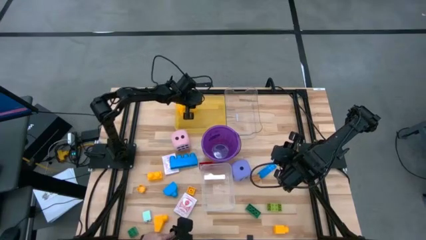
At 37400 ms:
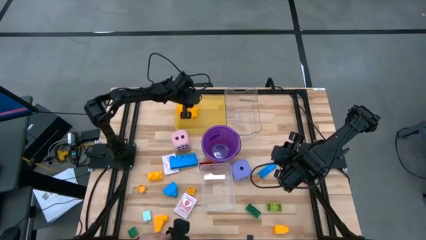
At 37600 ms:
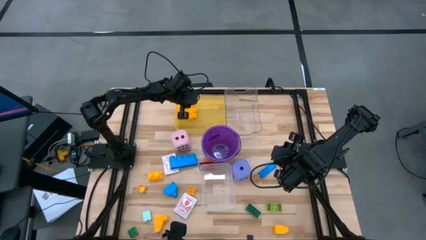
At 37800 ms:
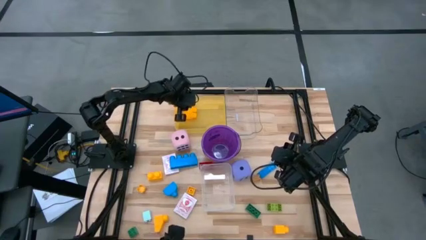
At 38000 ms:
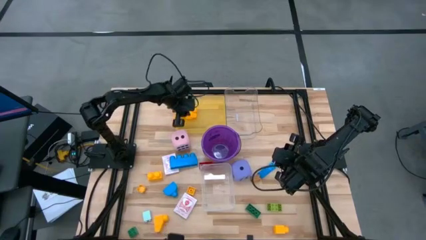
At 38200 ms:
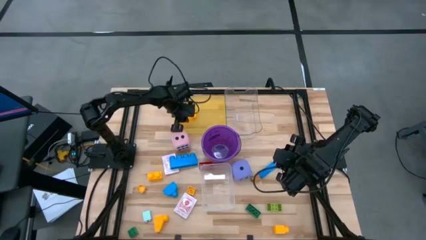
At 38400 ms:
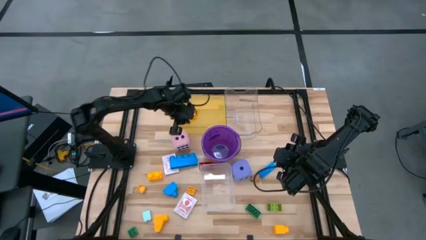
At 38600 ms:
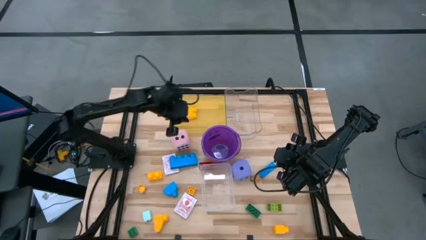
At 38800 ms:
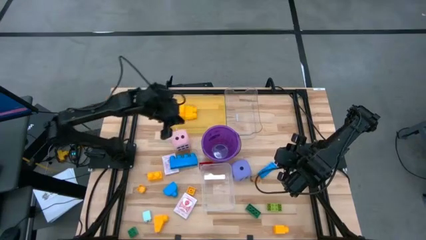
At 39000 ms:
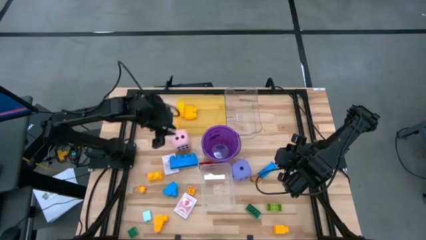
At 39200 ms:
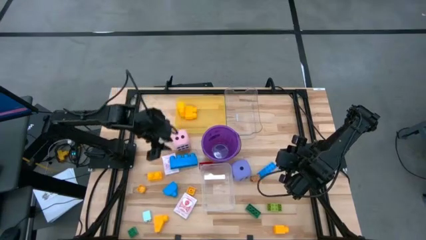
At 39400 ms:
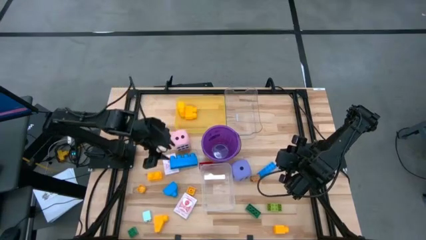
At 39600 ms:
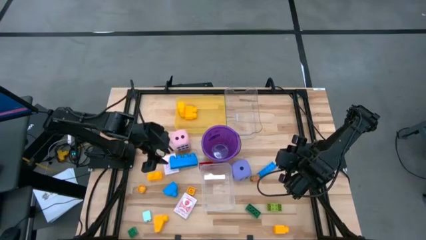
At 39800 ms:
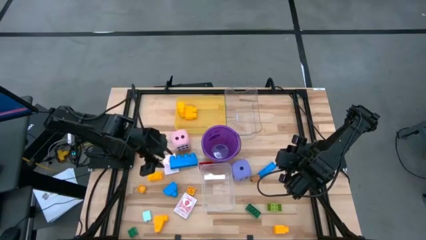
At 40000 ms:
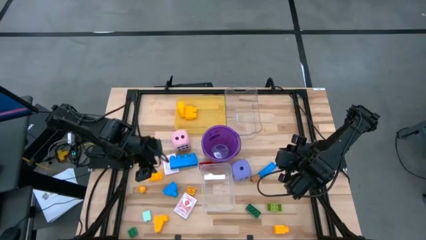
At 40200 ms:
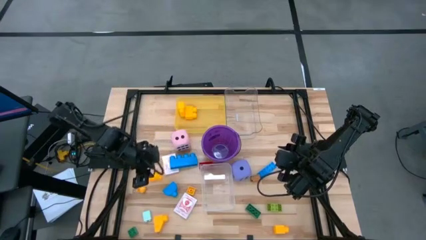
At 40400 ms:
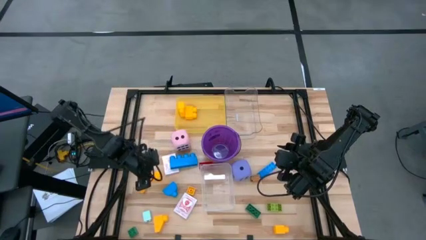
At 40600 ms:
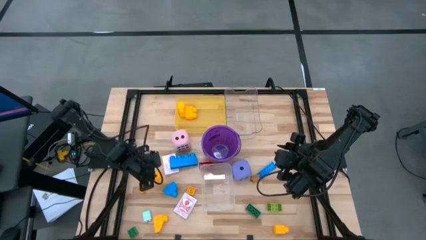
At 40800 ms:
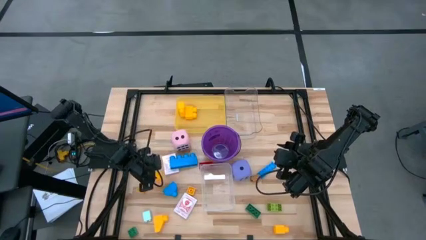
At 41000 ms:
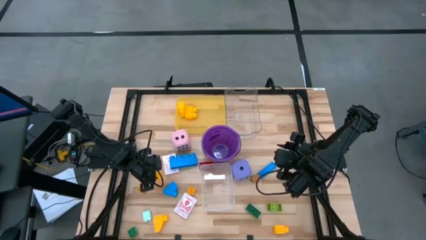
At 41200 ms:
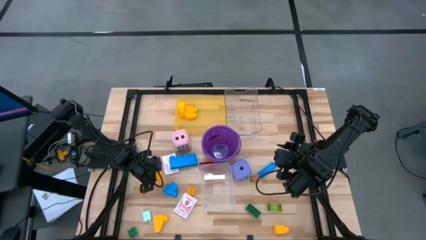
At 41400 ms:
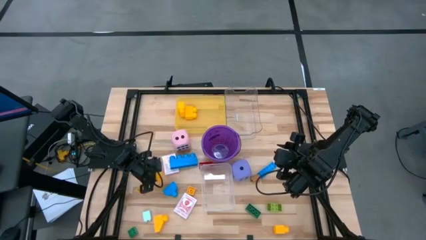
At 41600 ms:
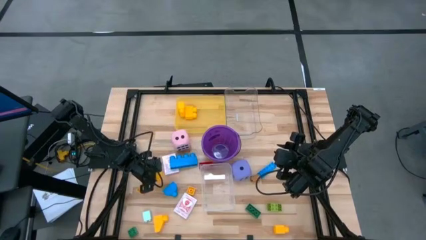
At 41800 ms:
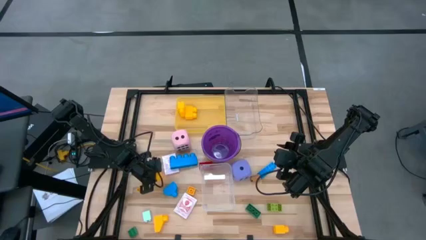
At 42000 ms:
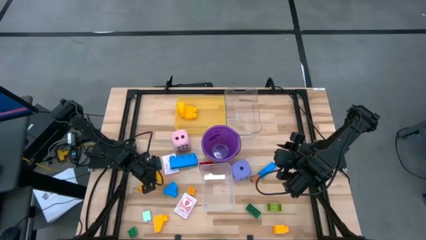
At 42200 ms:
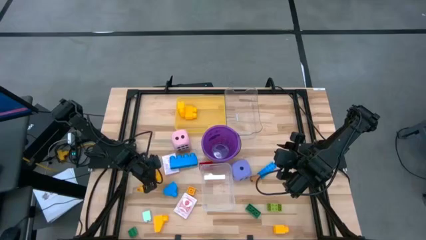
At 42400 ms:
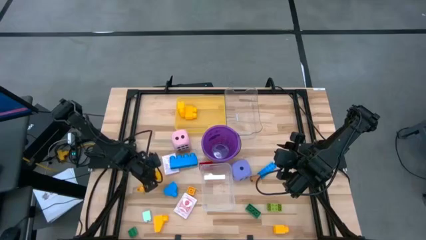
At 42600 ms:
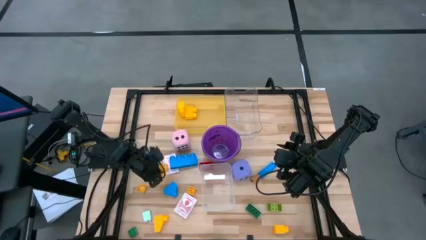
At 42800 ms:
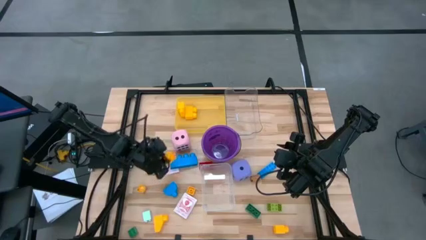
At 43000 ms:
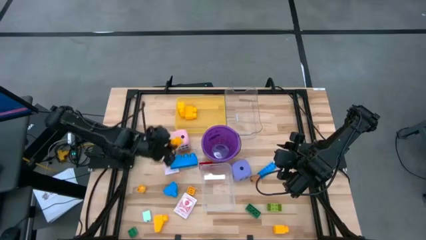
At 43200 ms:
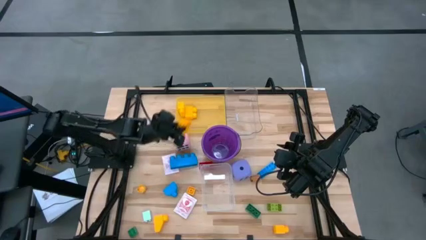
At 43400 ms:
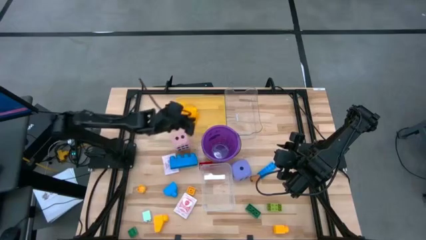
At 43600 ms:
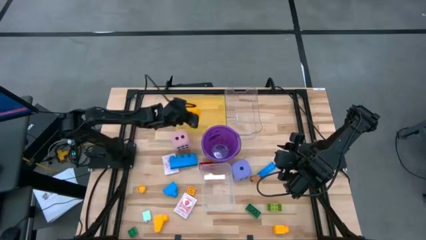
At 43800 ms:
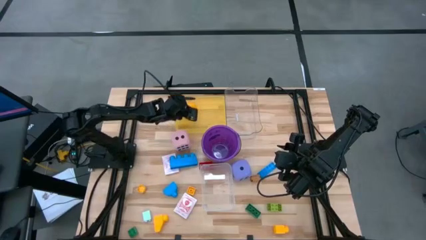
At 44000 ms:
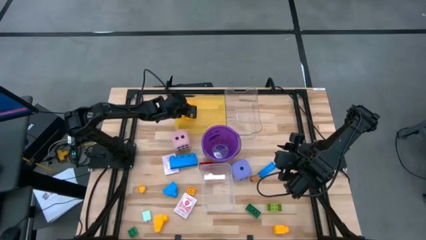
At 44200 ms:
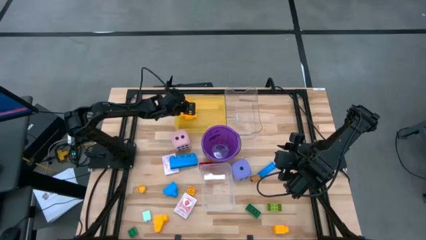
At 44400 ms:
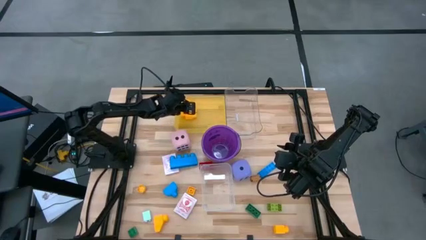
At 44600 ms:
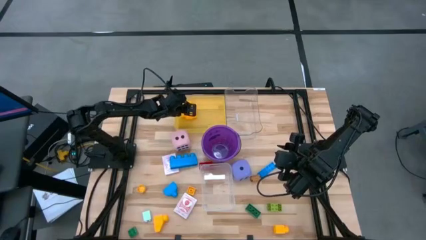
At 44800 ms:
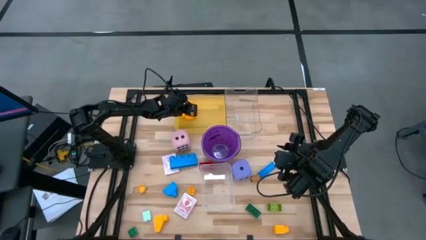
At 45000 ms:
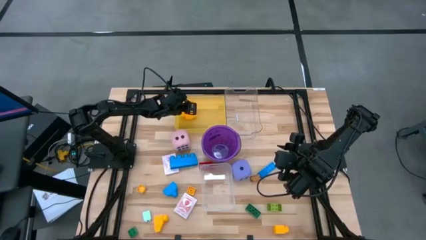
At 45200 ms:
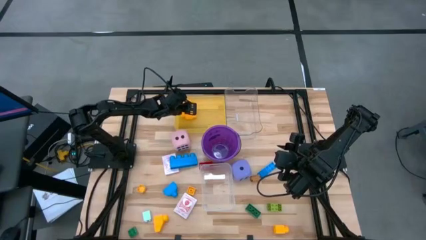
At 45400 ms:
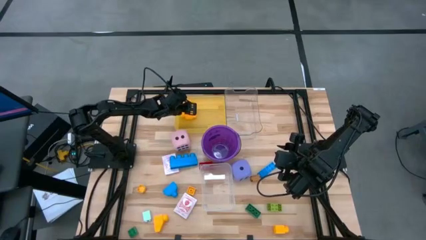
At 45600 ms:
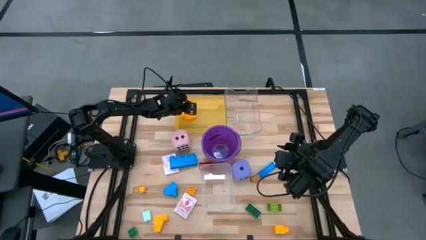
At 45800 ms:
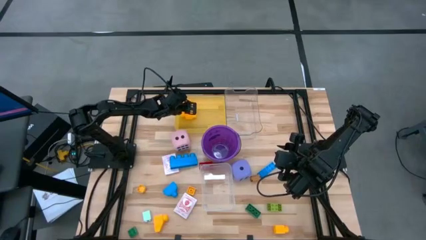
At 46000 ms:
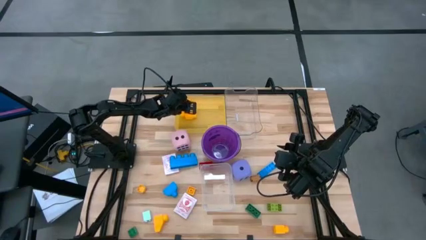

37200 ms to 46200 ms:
Task: Pick & Place Toys
Put the yellow game piece into the yellow bin

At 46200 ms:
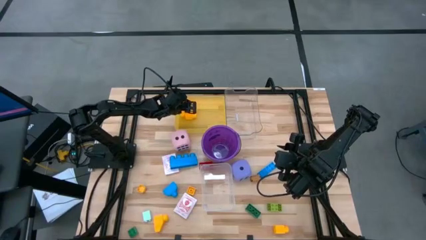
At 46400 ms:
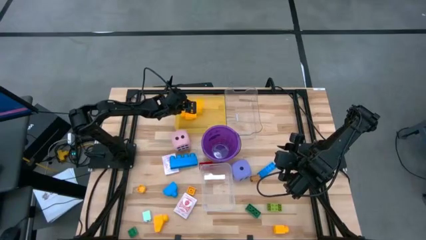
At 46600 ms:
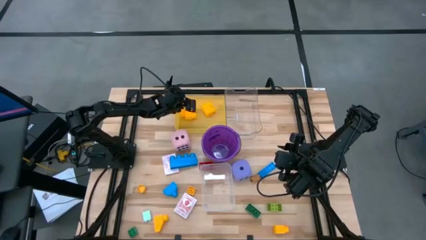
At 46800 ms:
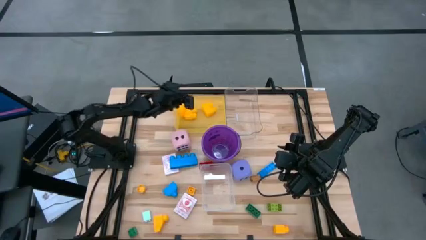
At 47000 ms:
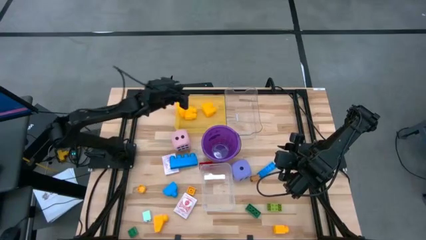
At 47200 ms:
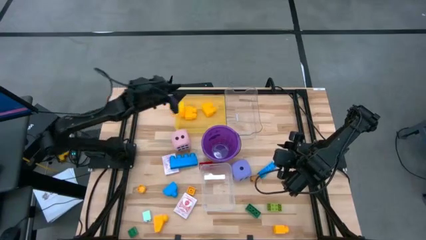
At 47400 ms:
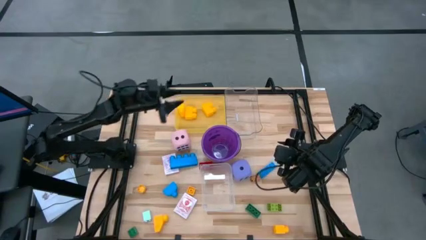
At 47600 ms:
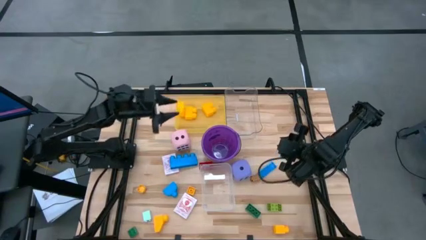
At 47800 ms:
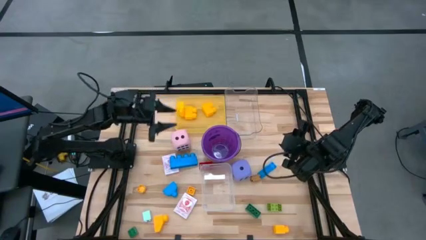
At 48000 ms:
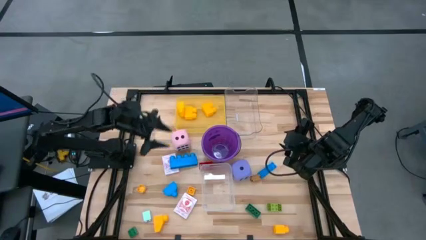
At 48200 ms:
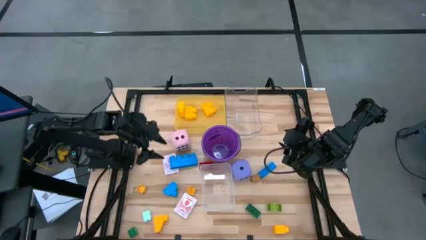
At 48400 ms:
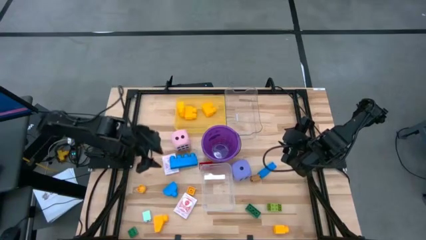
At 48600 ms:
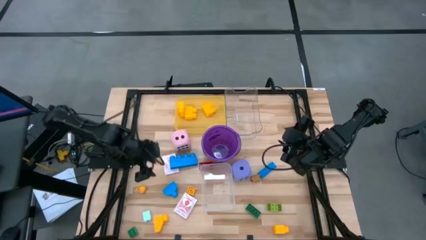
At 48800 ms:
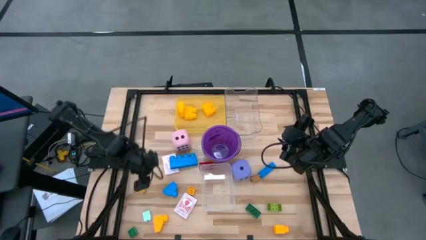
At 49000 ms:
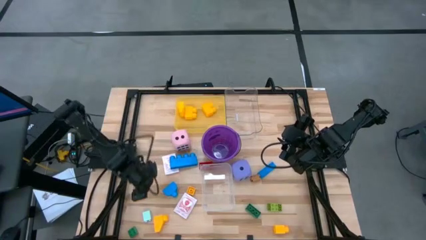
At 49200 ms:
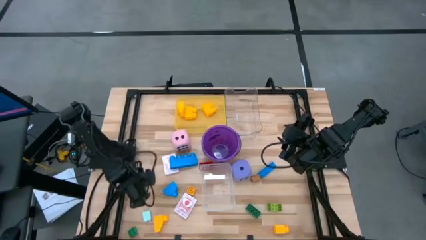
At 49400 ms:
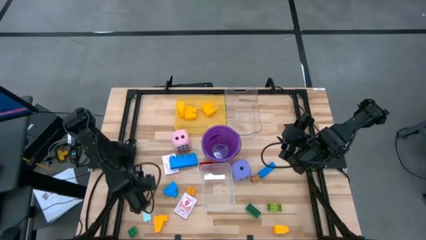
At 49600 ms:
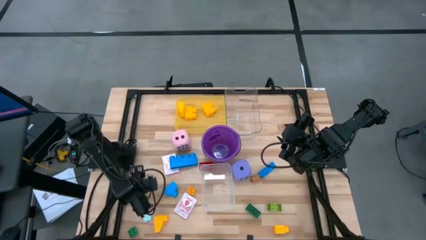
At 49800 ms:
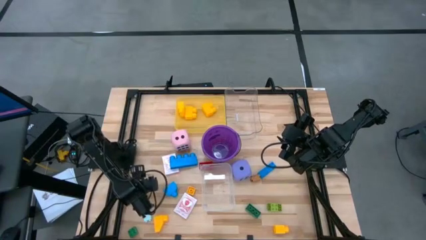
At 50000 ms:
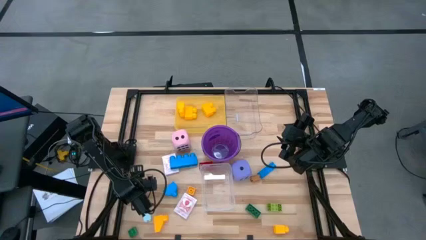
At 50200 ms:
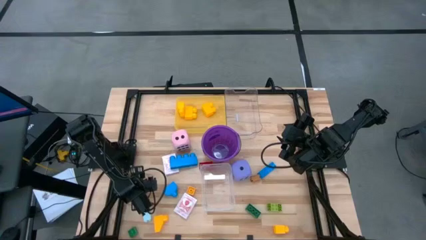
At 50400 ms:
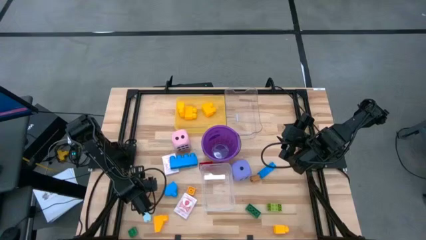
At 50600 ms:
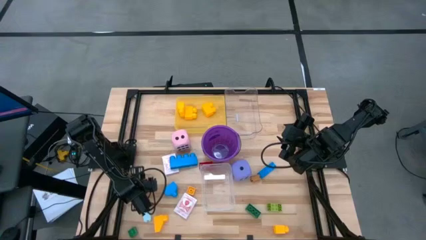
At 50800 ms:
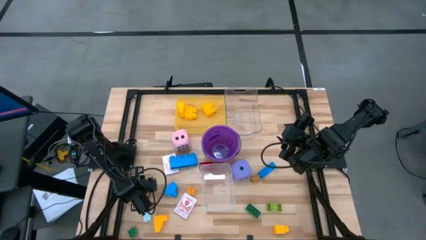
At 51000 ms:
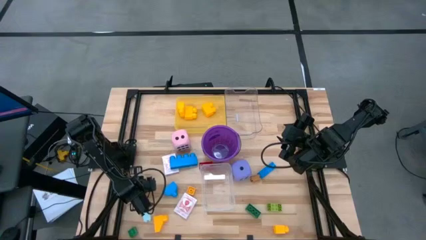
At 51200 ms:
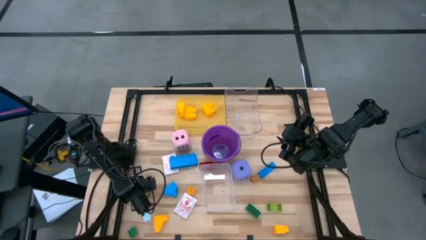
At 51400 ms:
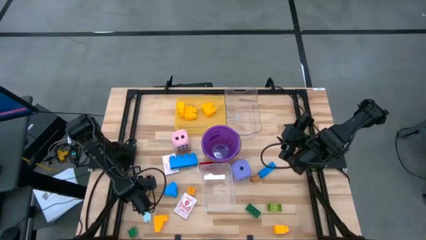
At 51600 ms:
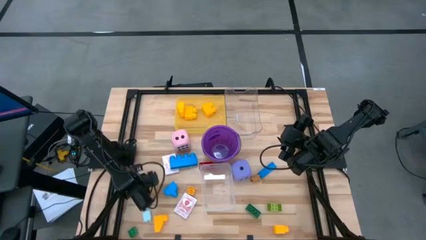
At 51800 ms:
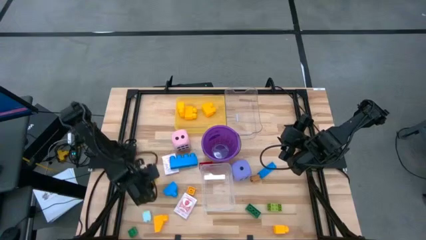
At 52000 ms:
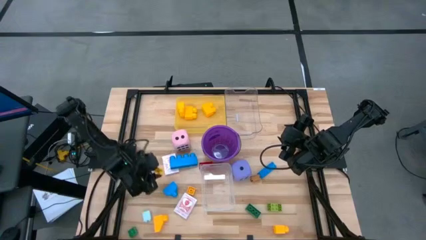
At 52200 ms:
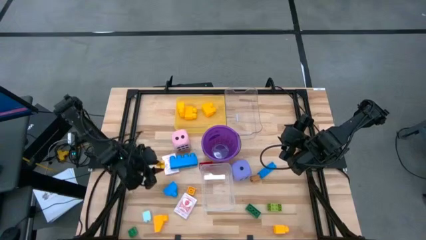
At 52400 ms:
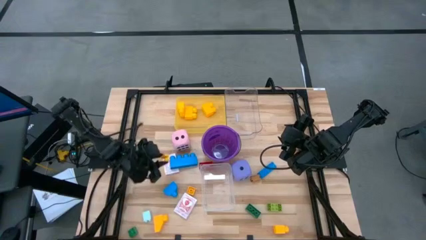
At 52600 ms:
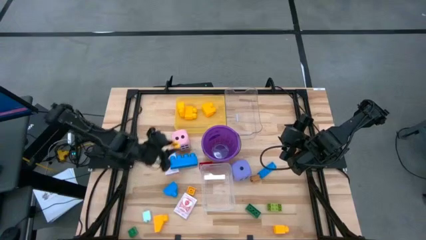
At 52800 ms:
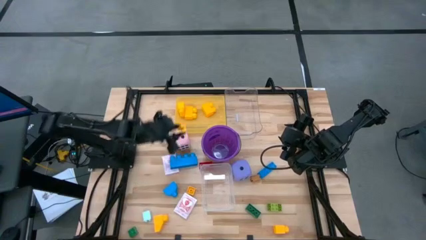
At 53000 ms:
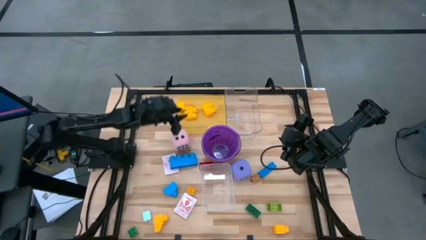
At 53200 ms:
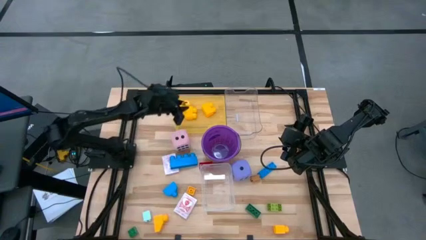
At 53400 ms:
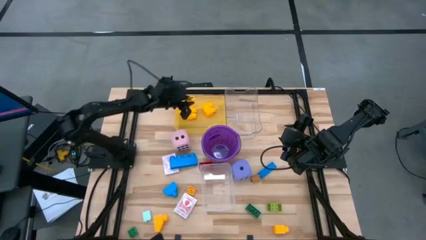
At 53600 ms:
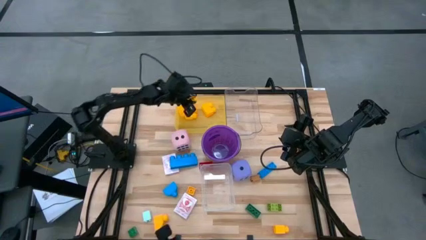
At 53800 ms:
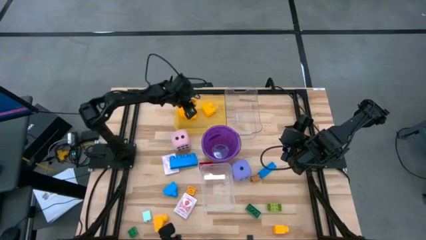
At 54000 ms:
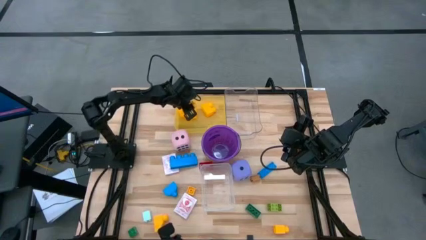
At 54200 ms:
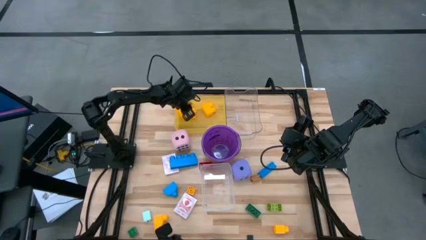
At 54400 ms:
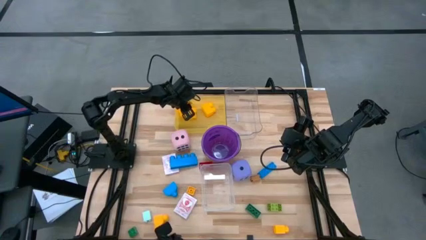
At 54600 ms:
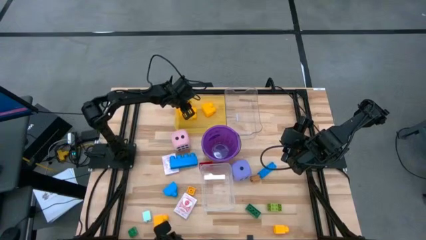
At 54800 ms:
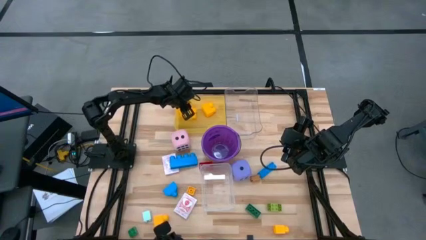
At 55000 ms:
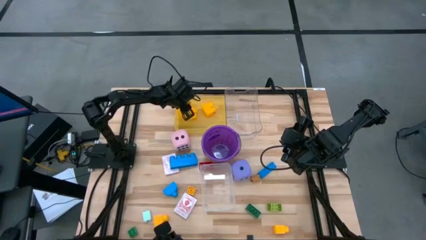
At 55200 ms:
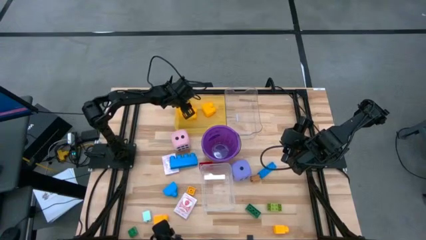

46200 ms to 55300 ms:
Put the yellow game piece into the yellow bin
